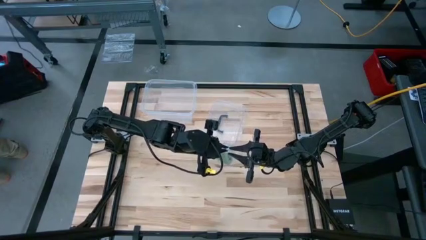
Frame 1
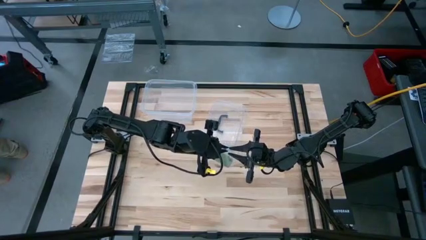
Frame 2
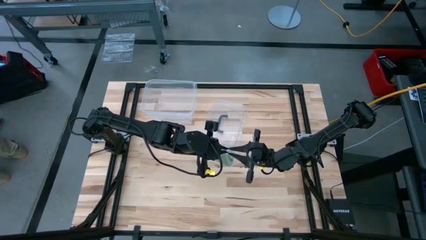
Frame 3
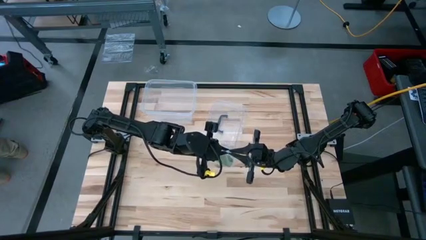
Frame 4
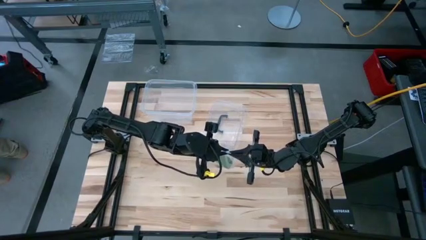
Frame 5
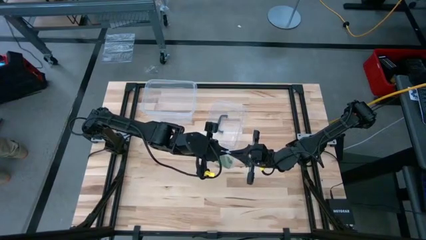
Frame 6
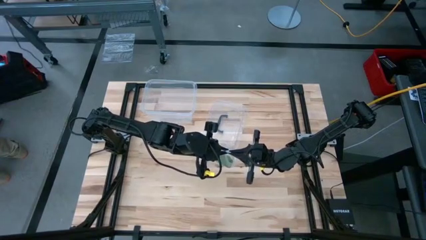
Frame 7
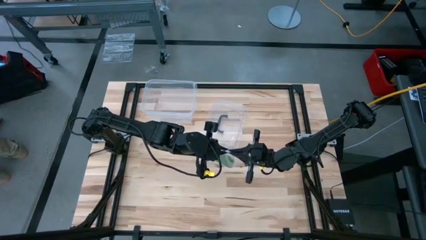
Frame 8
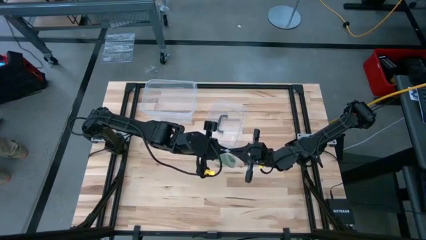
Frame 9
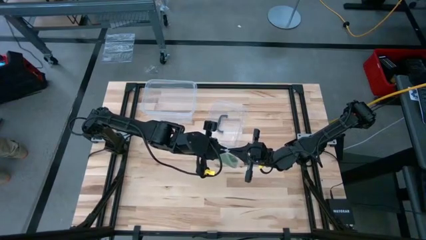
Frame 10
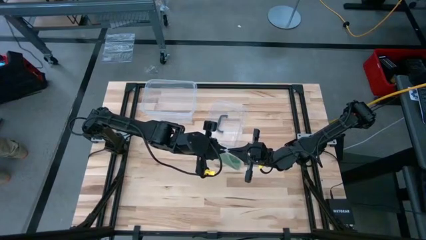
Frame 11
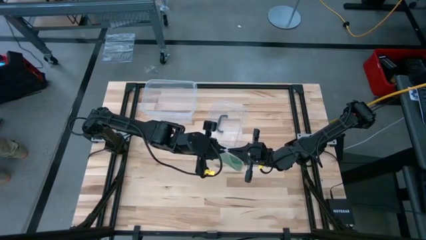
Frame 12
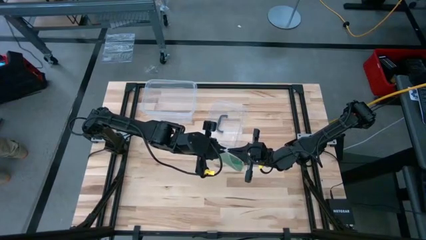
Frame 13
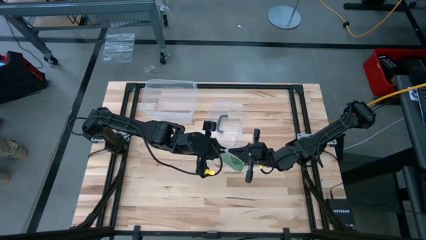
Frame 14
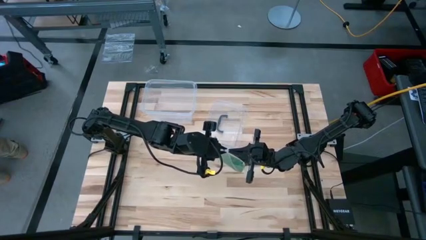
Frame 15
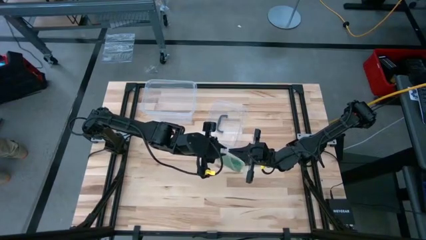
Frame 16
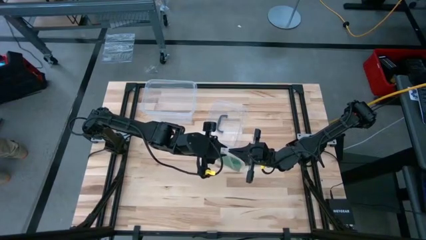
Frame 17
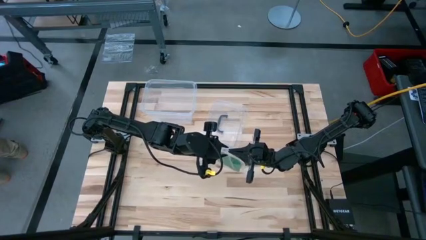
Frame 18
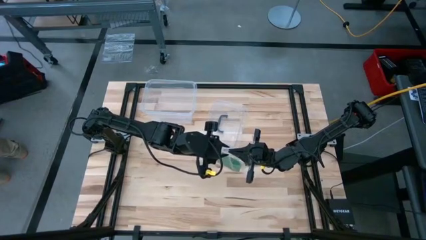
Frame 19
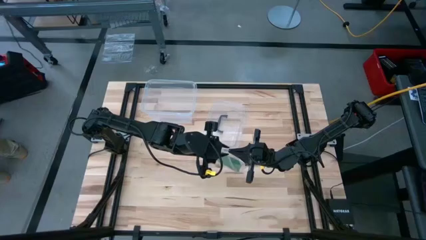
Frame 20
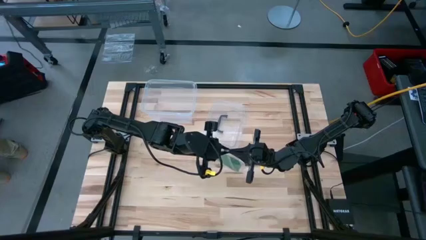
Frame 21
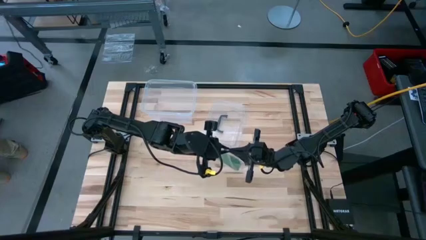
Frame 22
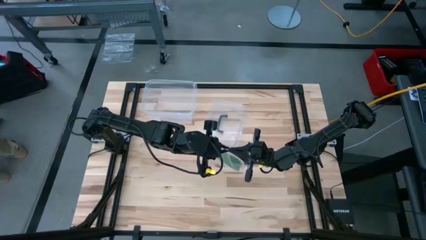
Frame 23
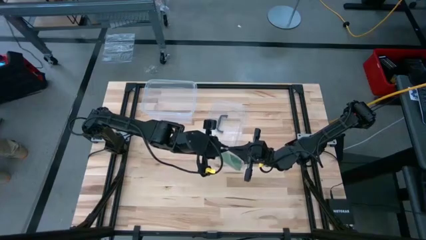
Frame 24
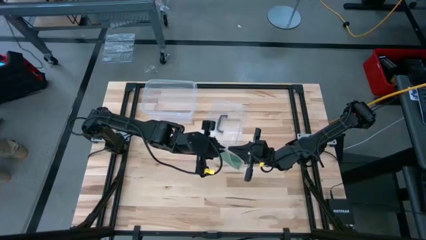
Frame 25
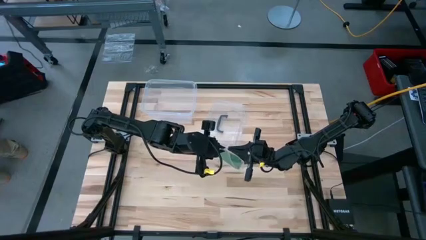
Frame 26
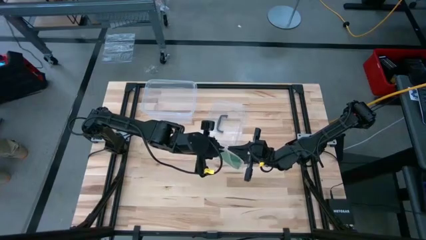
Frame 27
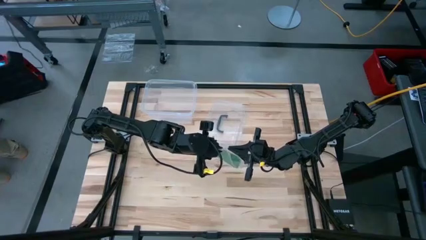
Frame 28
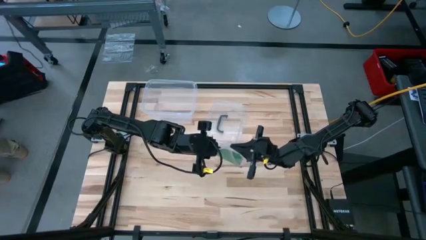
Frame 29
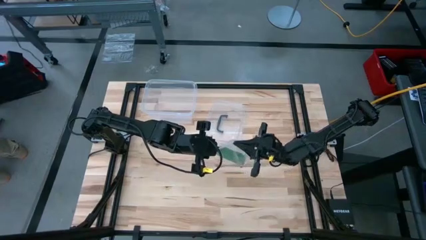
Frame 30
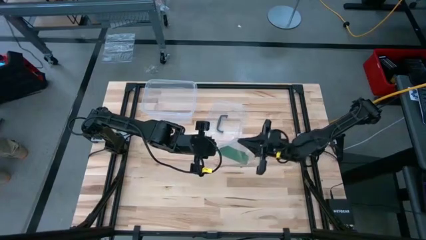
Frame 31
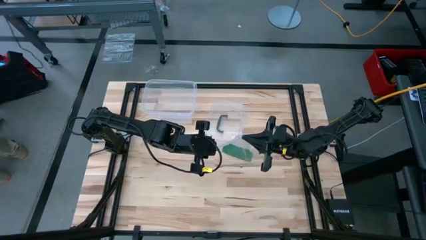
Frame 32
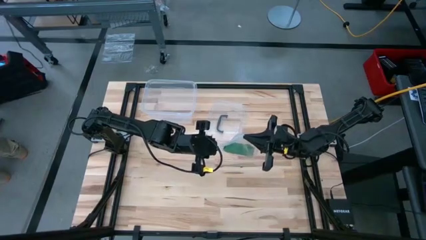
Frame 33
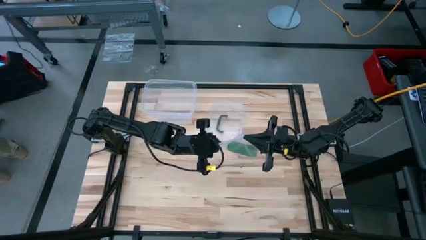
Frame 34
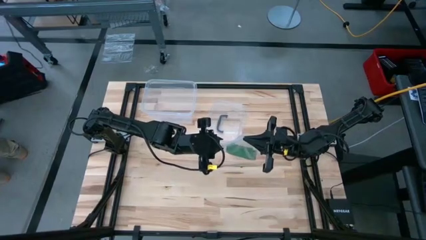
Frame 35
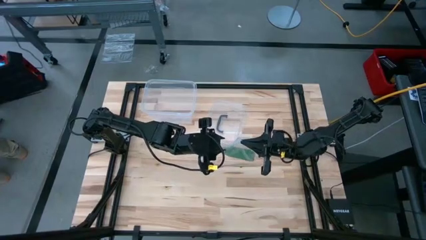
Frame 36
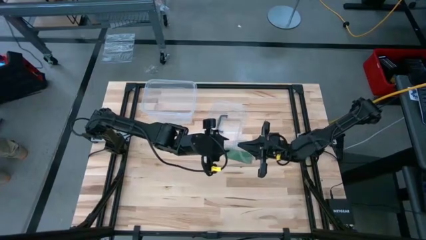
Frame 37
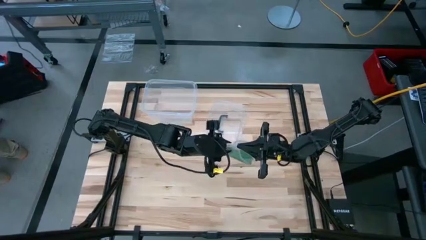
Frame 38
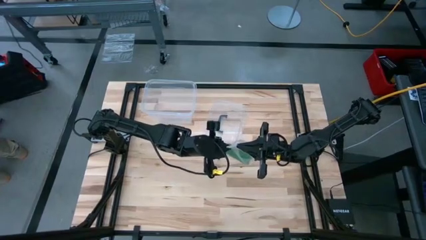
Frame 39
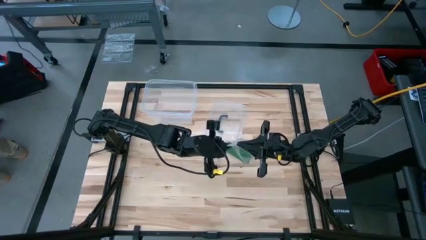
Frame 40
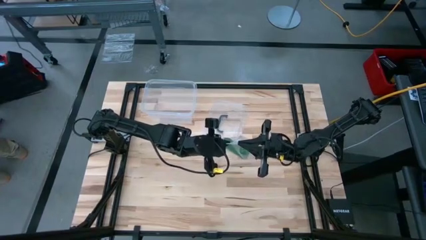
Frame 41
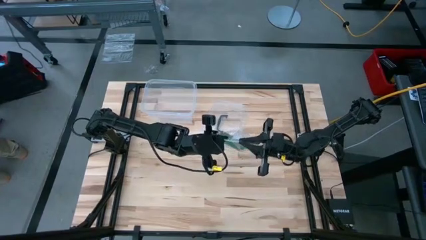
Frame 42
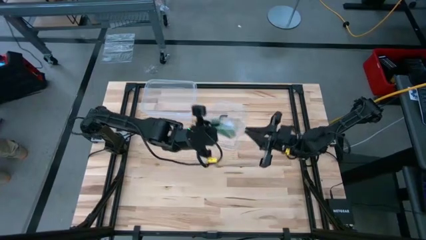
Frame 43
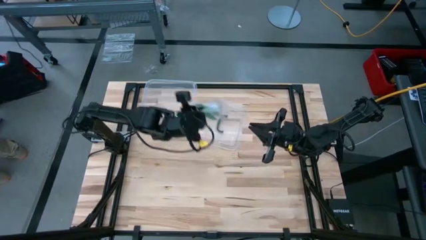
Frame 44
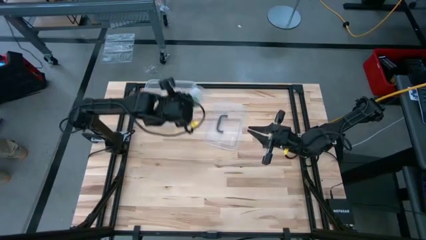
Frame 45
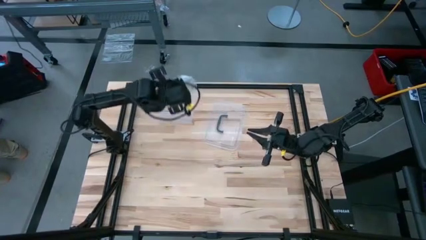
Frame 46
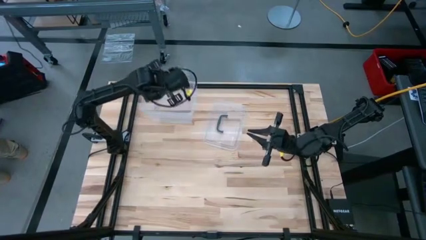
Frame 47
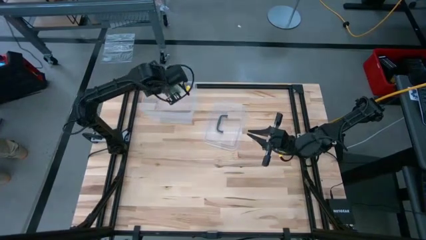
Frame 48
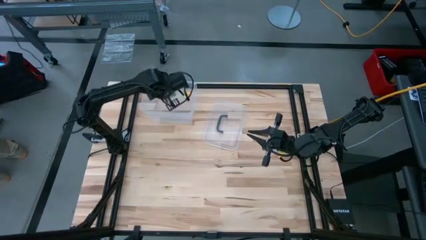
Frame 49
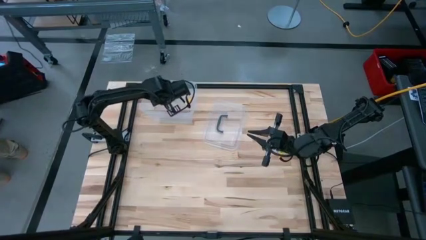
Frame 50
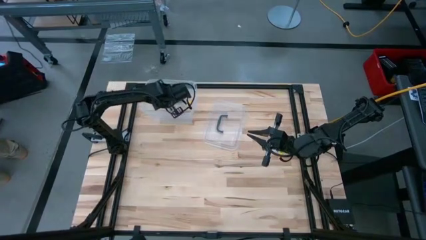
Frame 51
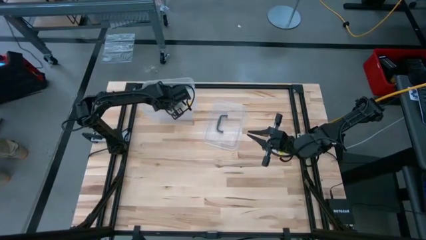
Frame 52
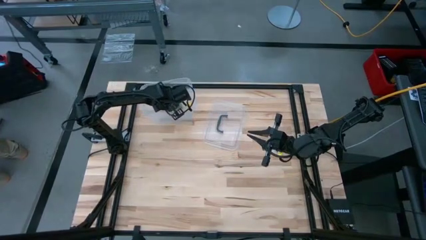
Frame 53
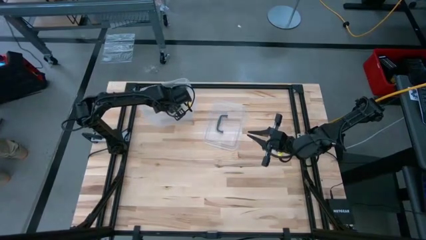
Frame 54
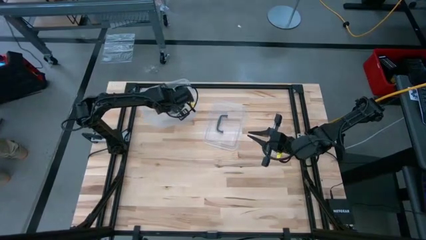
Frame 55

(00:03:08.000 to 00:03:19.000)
Task: Roll bandage
Close the transparent zip bag

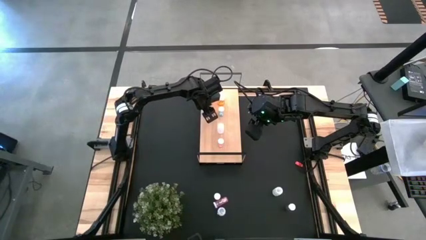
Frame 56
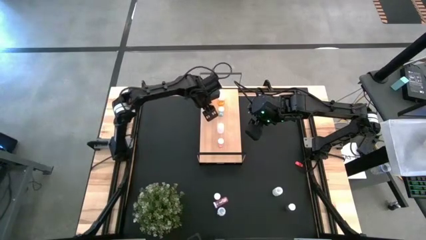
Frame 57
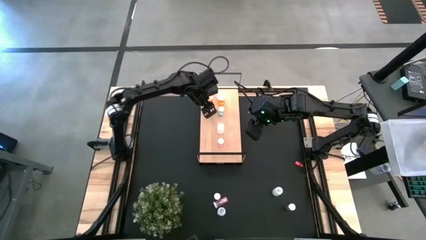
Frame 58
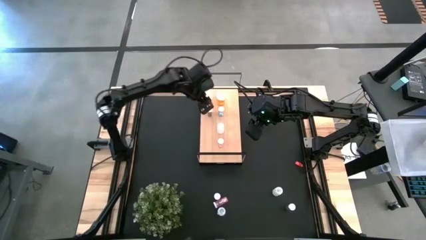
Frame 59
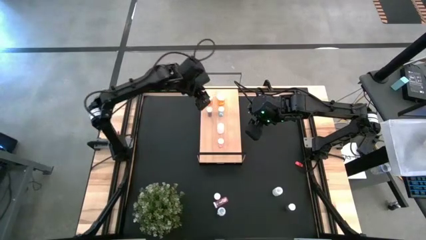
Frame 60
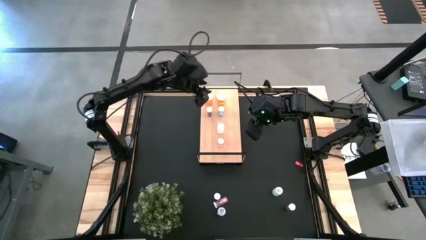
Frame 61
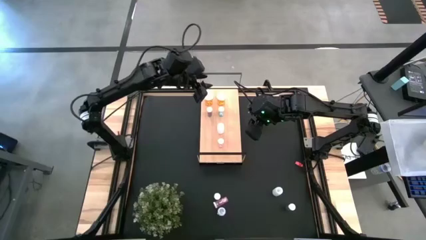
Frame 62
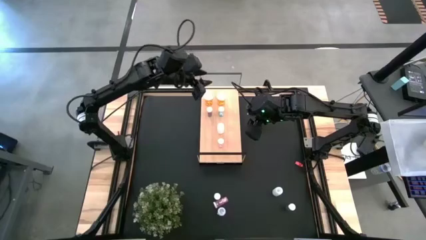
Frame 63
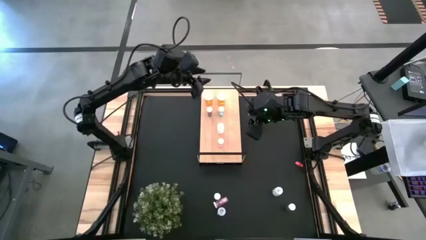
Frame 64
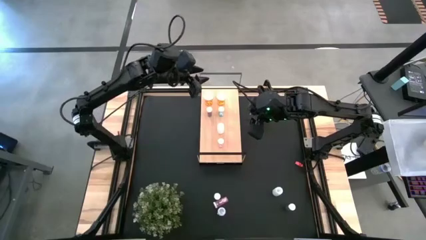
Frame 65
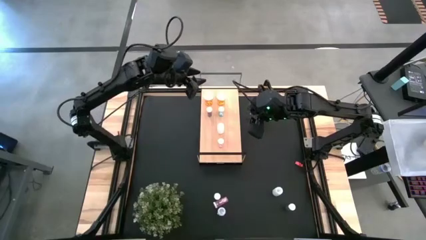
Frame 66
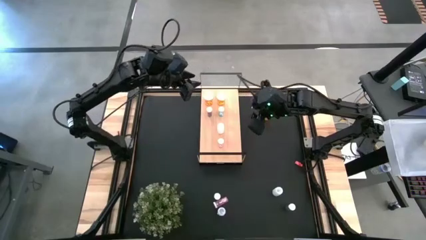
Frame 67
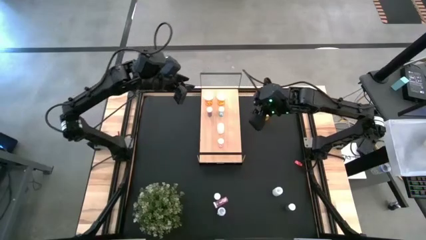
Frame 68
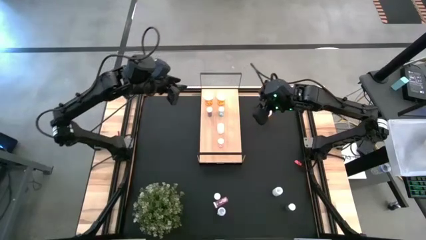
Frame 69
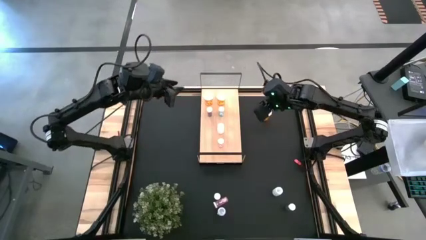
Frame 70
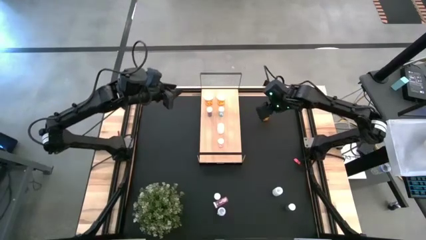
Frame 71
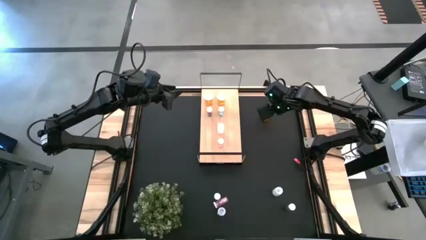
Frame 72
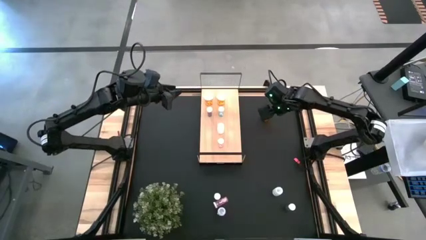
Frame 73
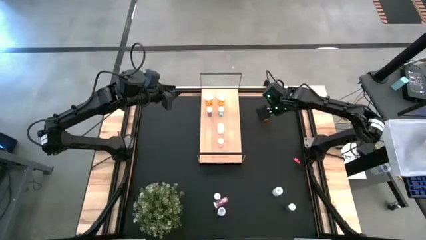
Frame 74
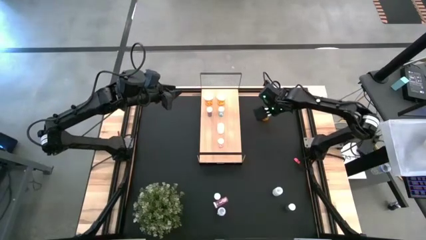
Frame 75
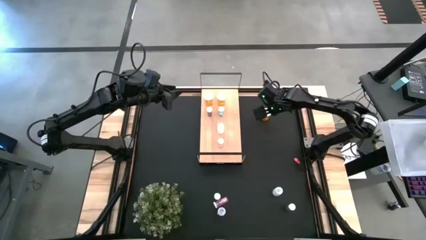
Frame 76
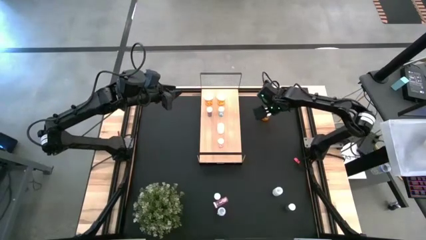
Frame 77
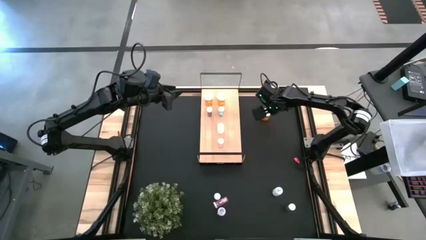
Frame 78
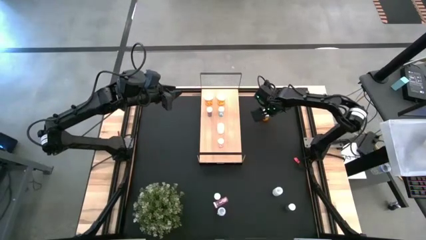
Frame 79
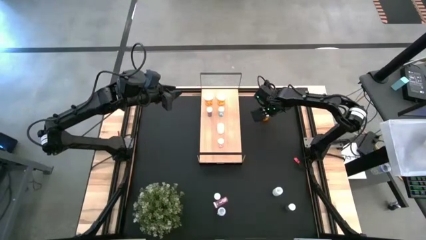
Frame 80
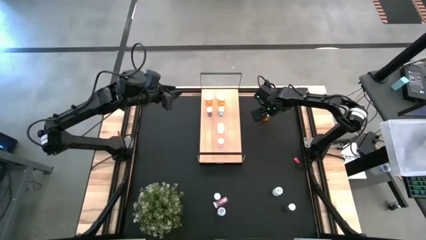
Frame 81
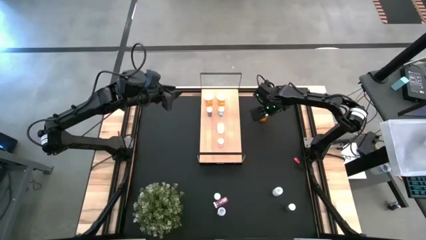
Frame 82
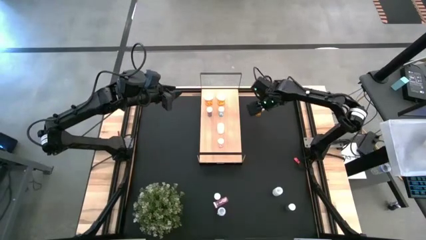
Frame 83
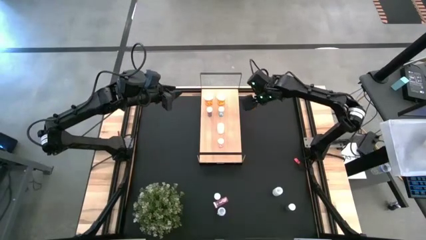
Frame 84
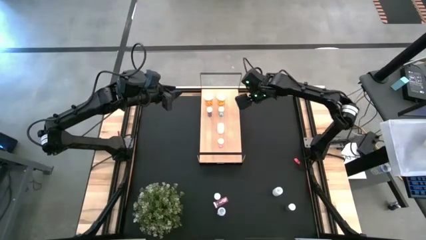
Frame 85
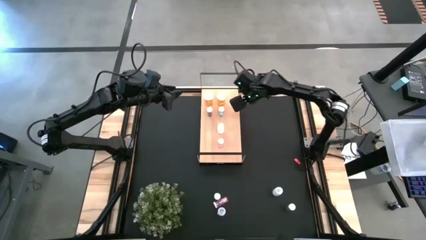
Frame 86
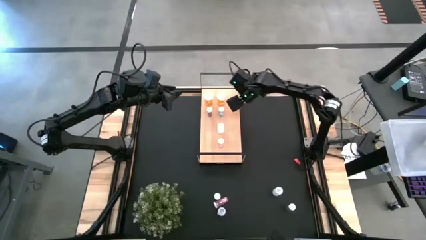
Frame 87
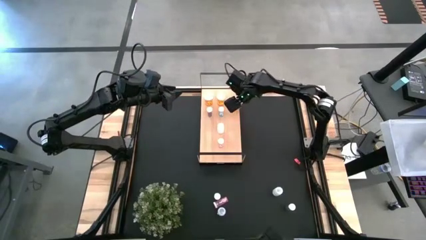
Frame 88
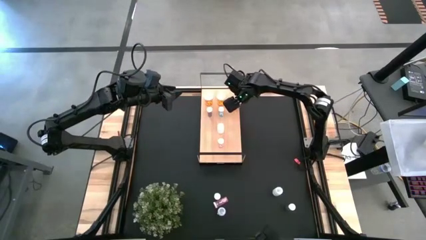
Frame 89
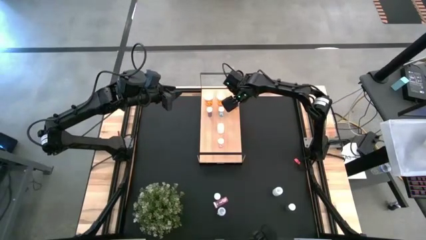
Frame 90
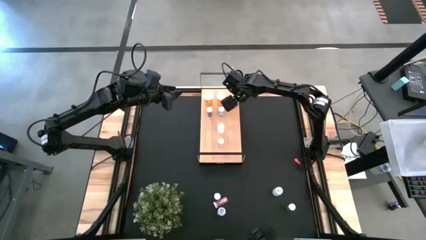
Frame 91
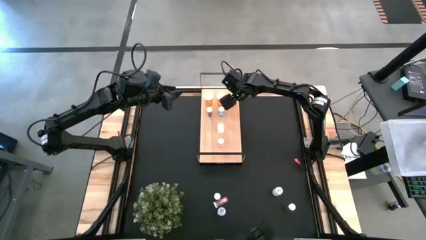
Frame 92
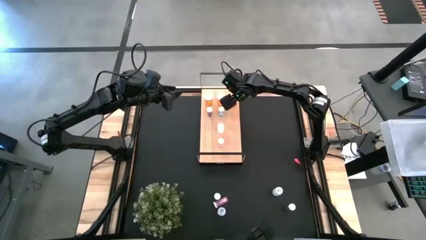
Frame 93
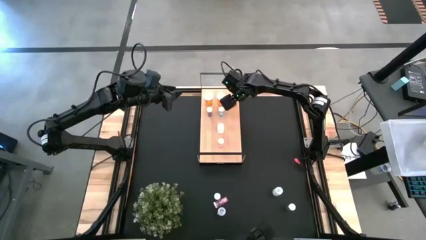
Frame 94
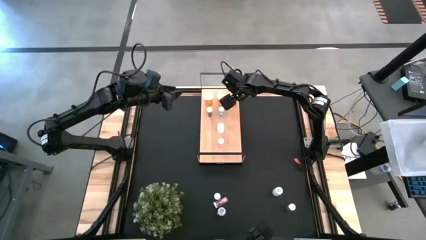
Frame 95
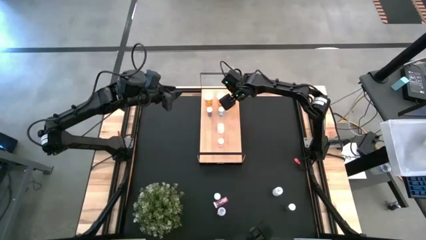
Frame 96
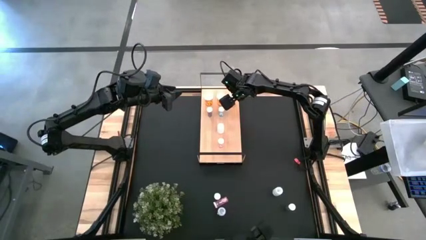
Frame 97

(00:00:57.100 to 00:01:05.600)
Task: Pick and place medicine bottles onto shelf by color
Put the orange pill bottle aligned with the orange pill bottle on the shelf
